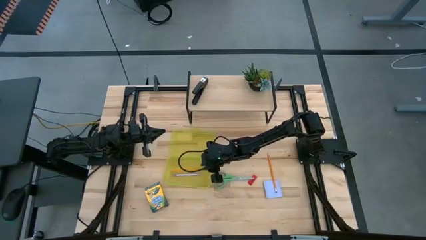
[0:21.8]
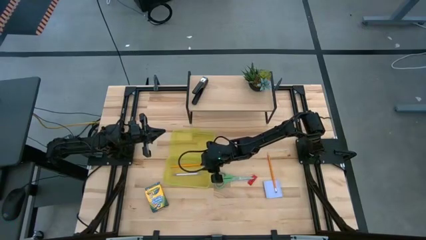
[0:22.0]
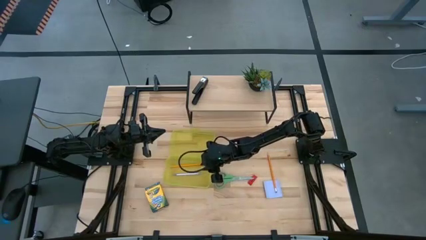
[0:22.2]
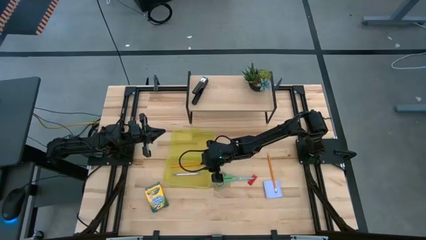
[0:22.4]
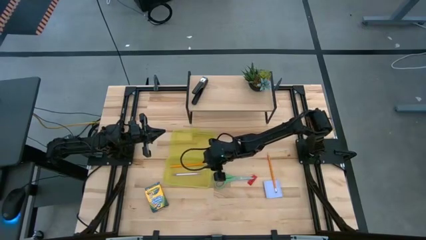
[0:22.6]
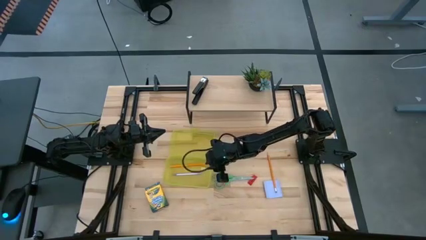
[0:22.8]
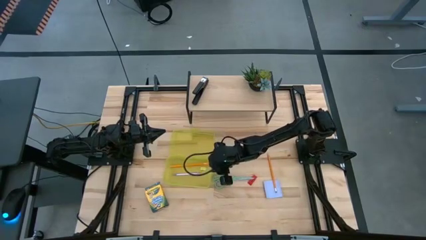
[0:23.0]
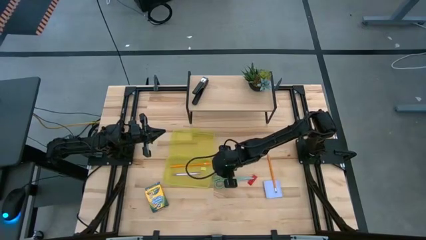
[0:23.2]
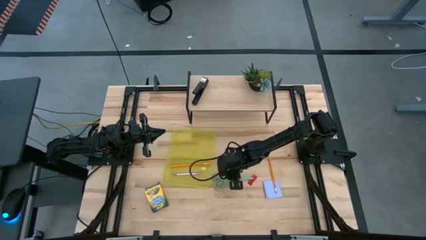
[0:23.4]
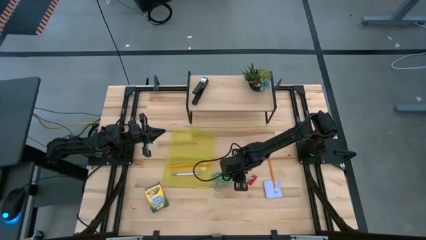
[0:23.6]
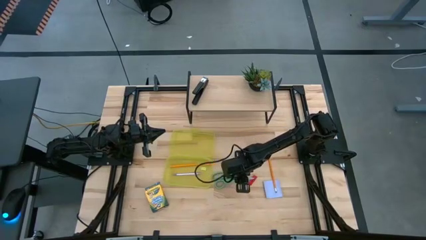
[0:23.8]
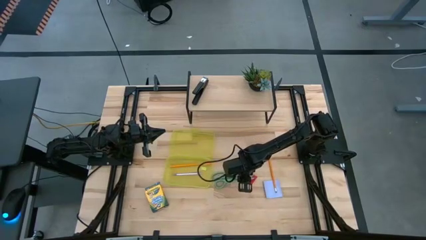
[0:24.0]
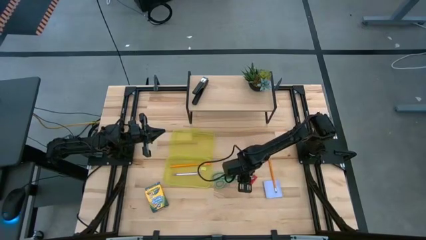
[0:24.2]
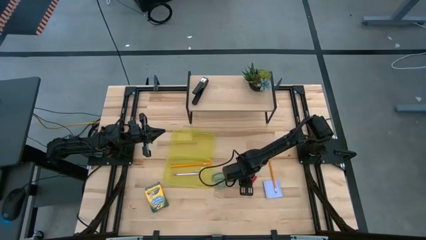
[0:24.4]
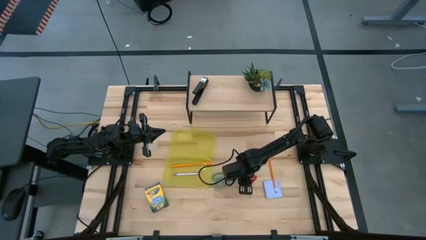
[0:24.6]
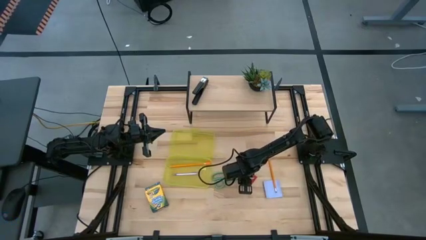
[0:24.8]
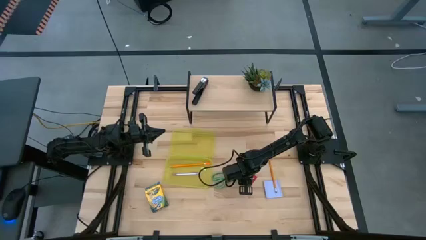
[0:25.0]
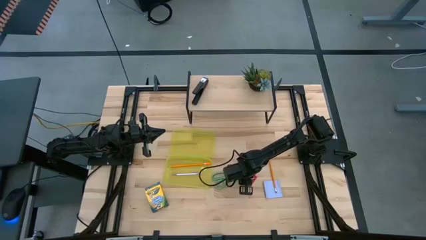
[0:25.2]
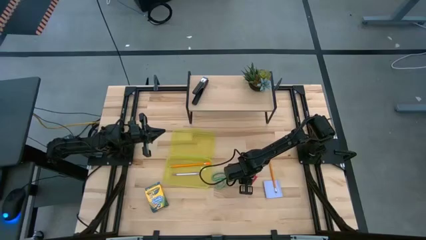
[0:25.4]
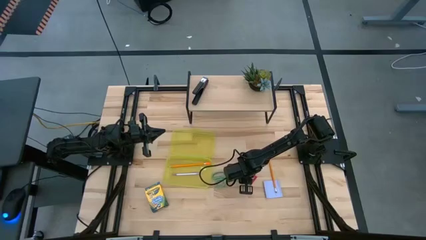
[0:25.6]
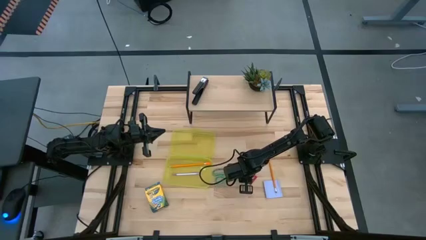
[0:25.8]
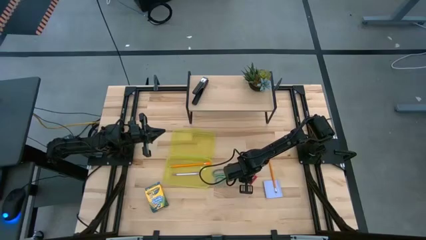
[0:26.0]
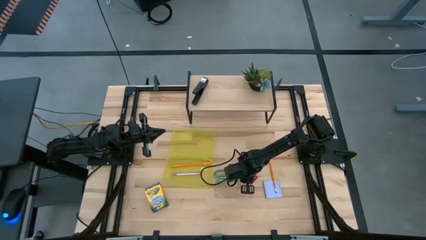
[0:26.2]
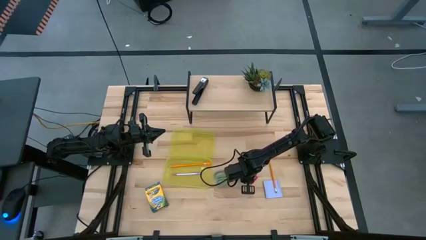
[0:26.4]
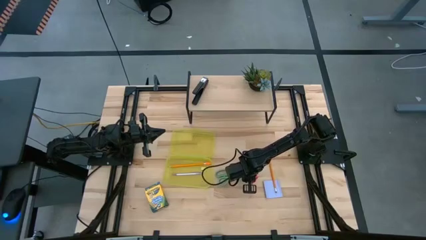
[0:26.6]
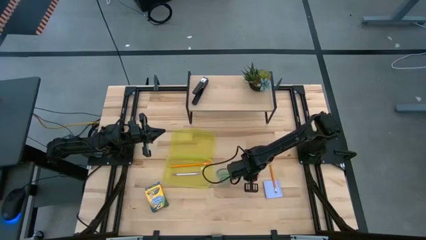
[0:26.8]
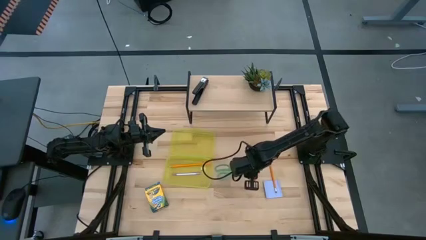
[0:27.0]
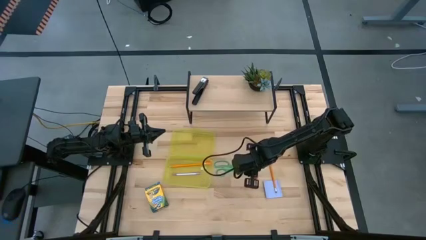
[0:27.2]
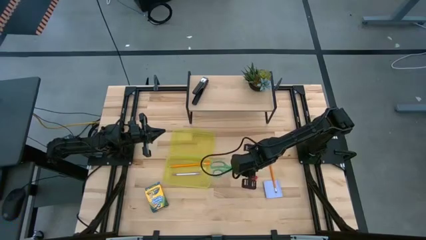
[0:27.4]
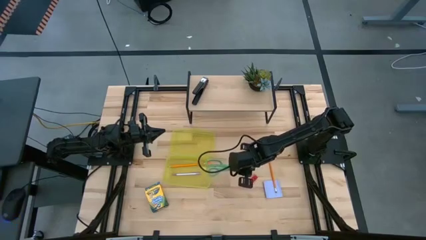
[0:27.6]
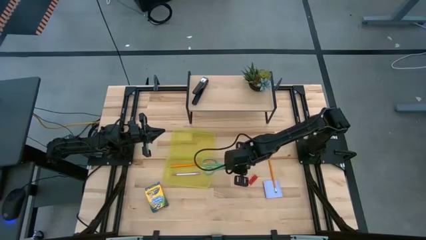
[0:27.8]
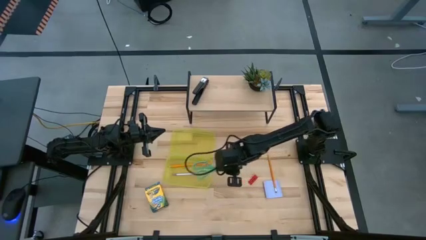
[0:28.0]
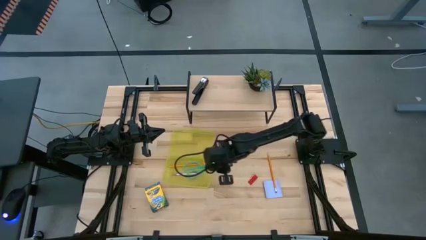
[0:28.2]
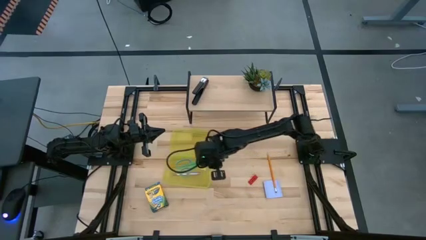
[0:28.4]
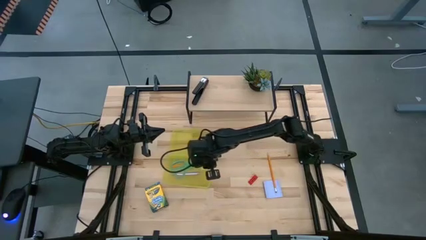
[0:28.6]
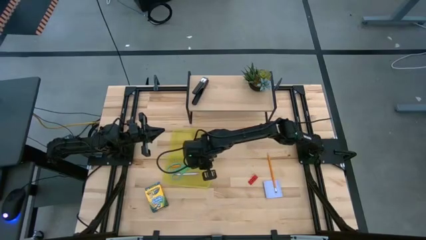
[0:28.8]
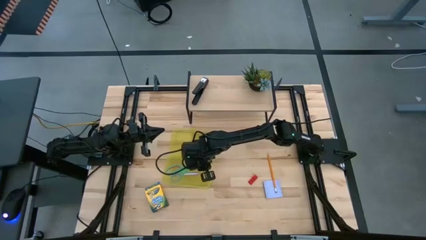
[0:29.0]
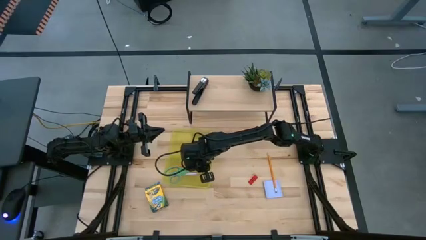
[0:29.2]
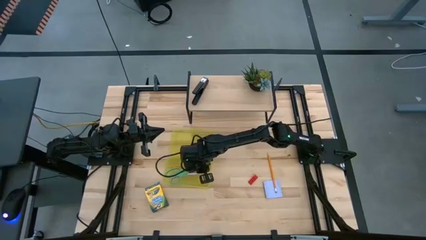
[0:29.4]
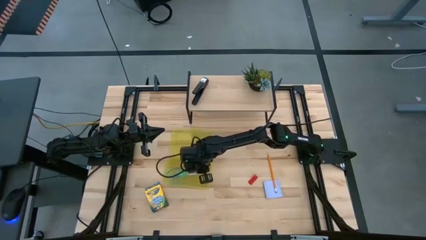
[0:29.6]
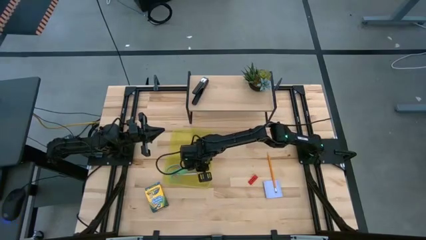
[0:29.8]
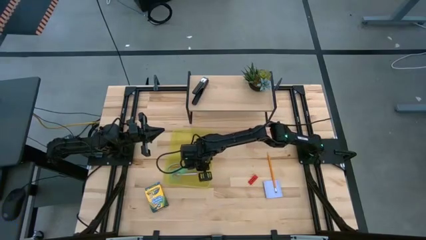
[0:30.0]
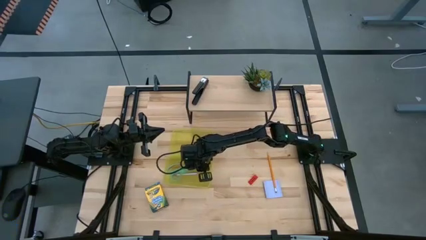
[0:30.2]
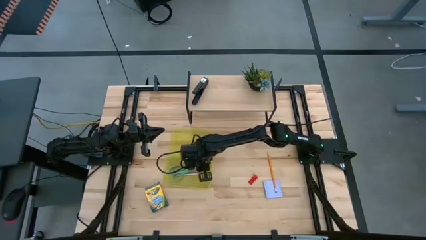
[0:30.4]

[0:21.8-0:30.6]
Task: Pack school essentials
Put the green scissors into the supply box

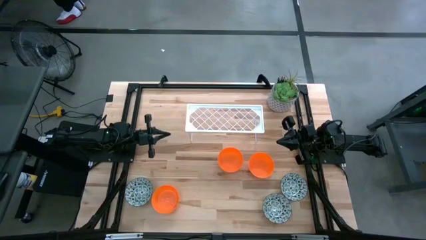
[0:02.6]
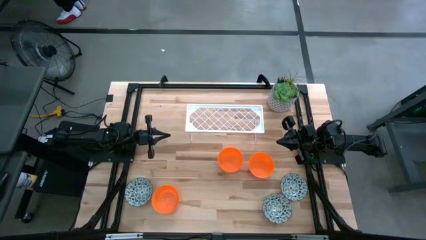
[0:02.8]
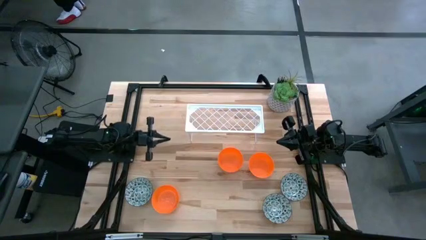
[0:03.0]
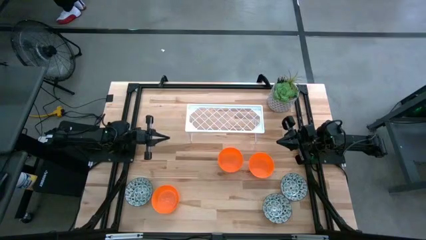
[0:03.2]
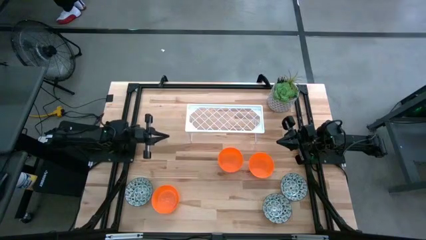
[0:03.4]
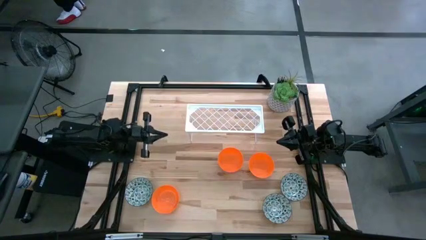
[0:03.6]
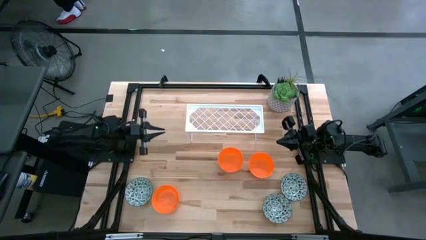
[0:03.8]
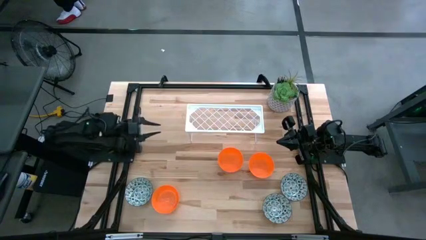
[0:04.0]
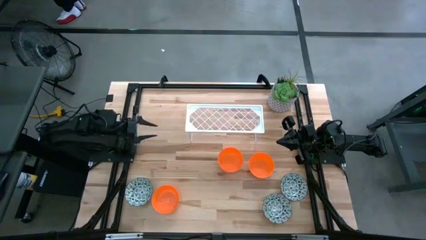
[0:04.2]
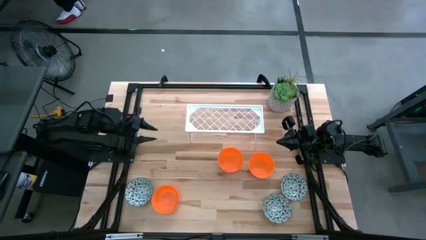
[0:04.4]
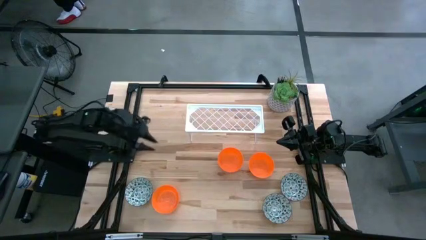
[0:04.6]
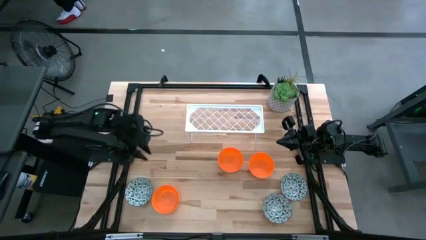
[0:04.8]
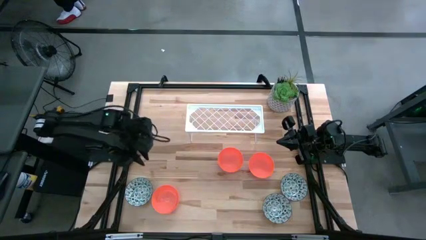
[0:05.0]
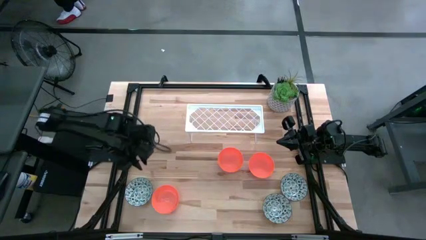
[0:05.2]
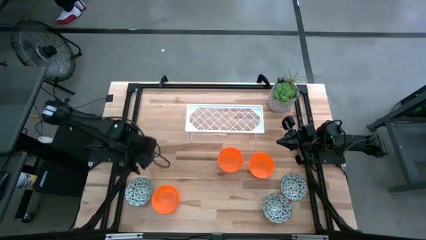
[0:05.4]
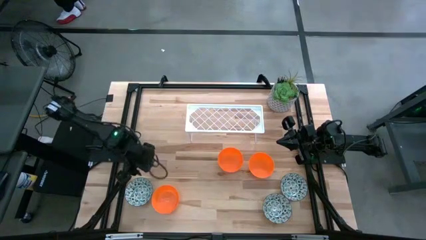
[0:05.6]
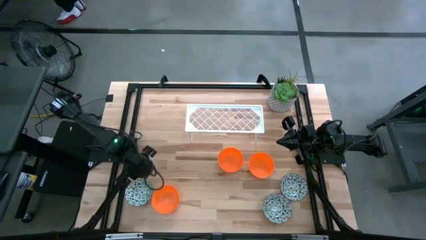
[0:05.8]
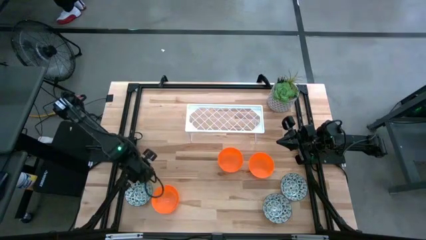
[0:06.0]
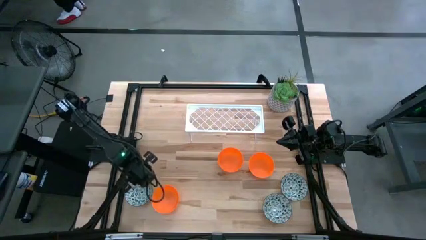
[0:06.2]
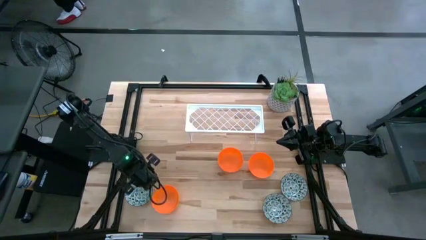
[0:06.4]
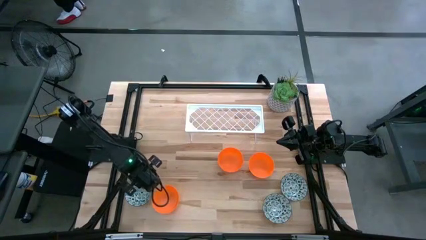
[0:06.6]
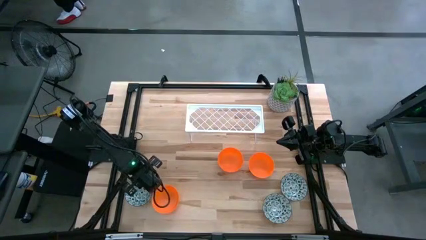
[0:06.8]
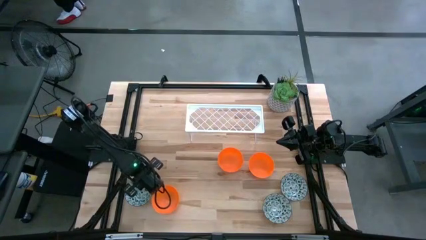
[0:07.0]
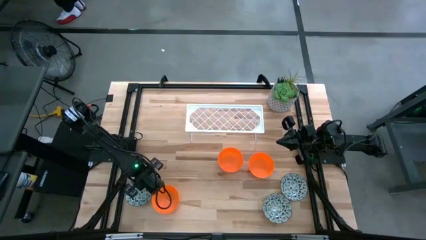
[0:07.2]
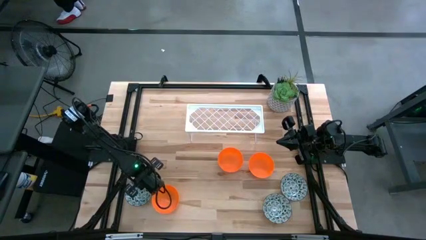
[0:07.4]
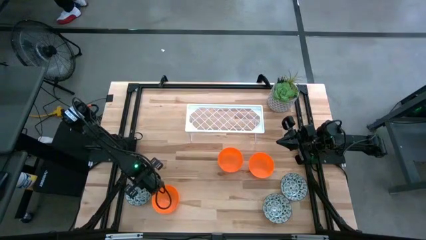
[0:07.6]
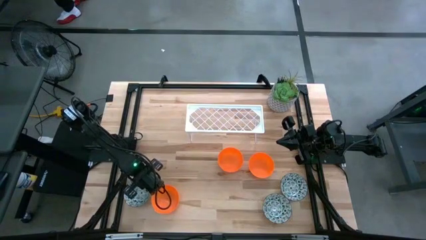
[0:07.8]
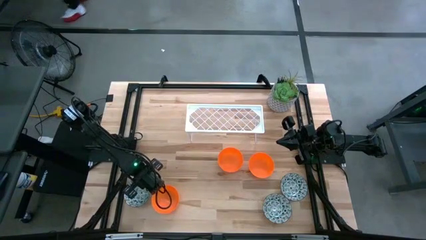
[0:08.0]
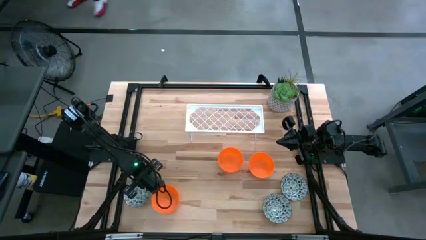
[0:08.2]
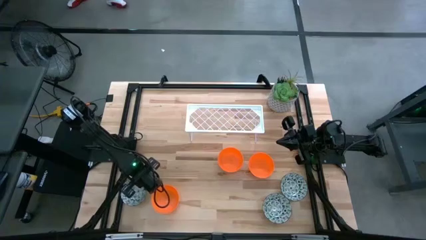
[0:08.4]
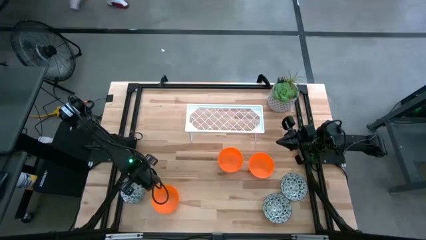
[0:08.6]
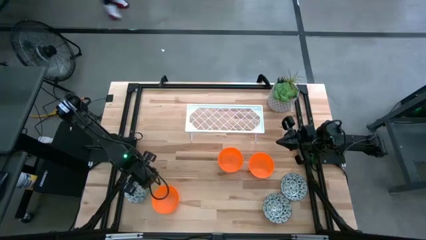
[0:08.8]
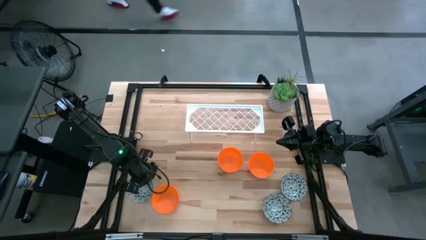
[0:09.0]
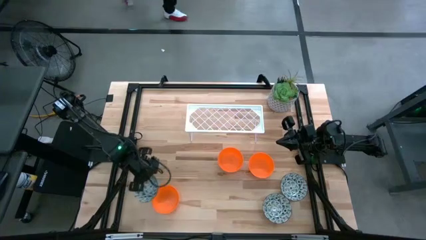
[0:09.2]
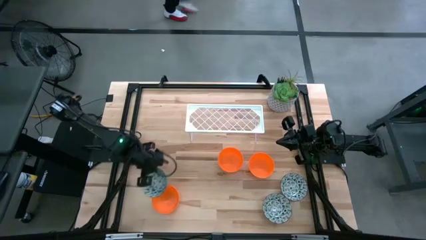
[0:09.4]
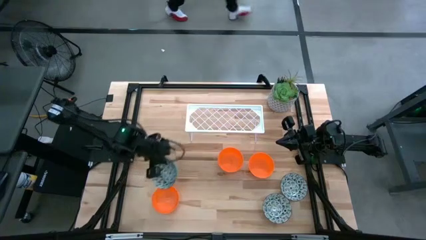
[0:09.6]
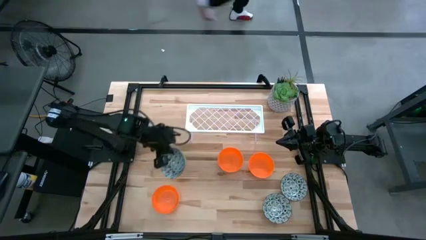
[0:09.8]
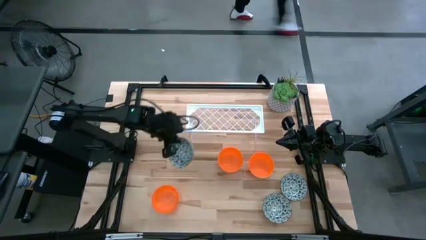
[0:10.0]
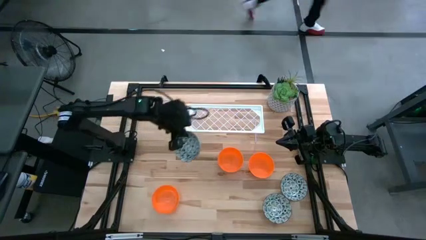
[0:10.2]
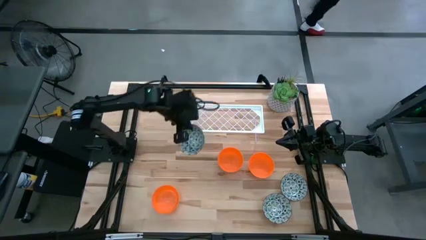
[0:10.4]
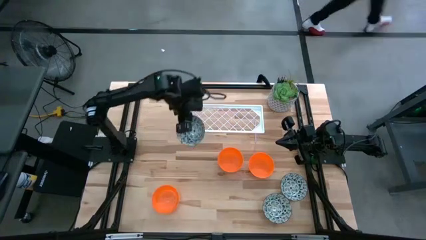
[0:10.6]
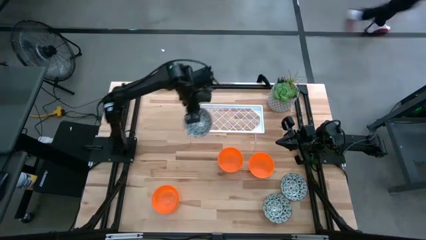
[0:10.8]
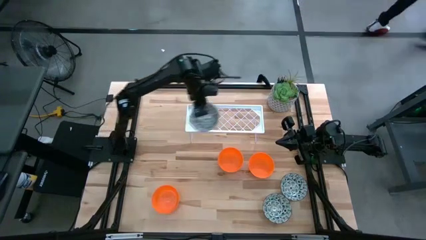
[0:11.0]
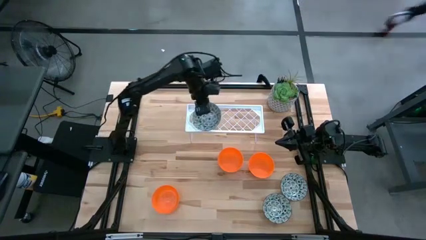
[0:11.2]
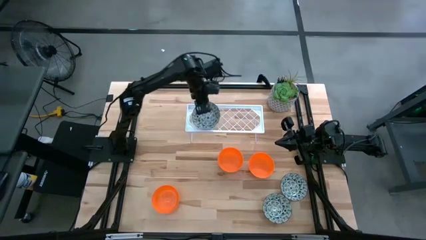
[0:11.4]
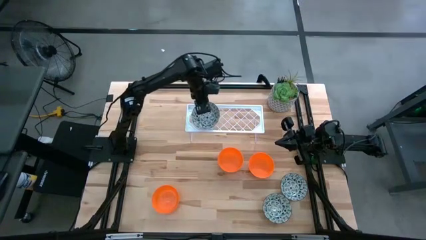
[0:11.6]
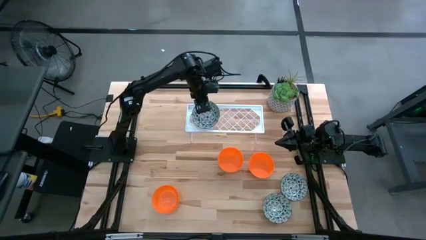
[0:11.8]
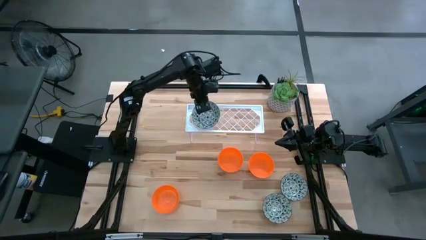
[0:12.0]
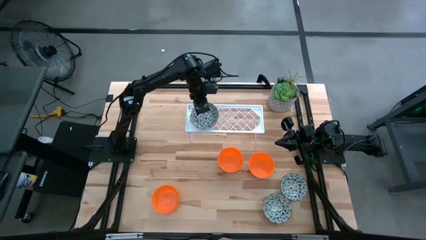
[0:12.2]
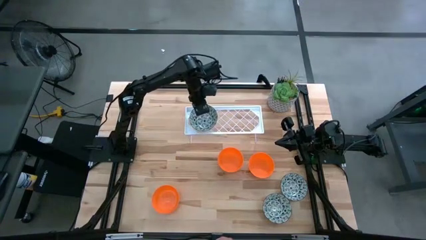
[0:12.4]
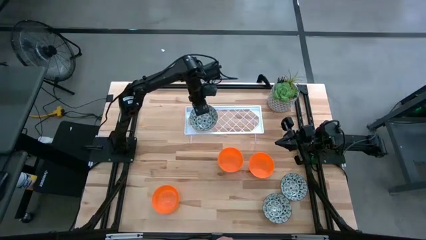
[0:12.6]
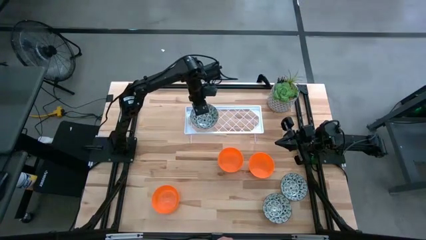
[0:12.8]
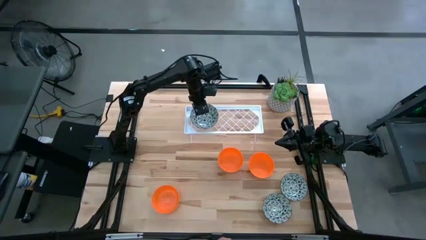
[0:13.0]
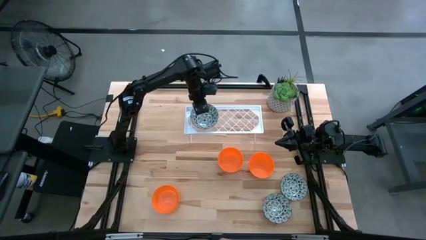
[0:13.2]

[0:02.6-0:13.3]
Task: Pick & Place Mini bowls
Put the left blue patterned bowl on the shelf
